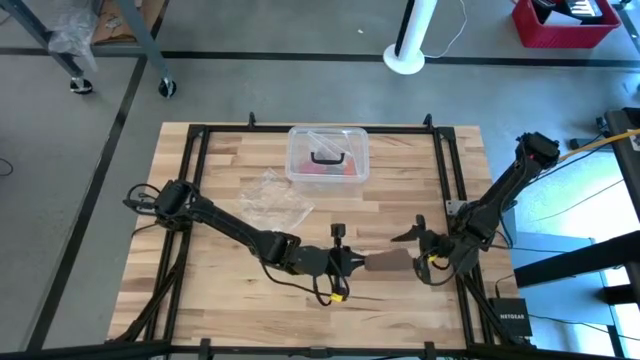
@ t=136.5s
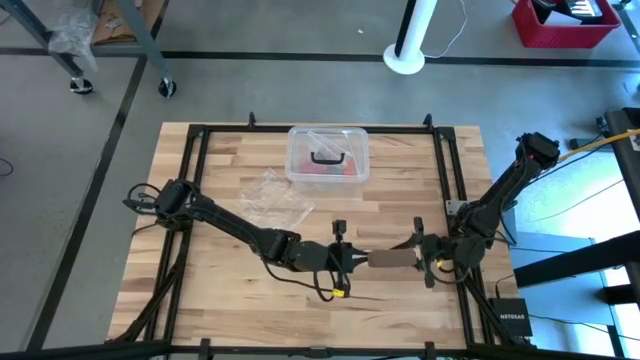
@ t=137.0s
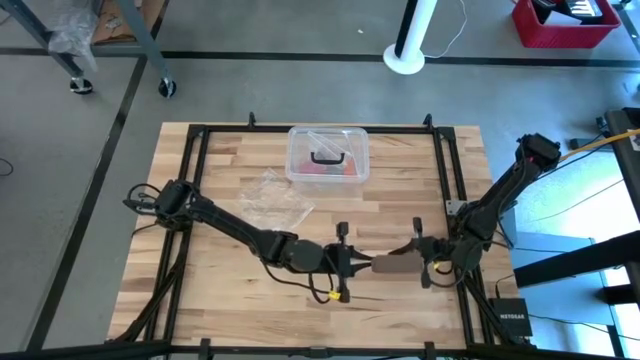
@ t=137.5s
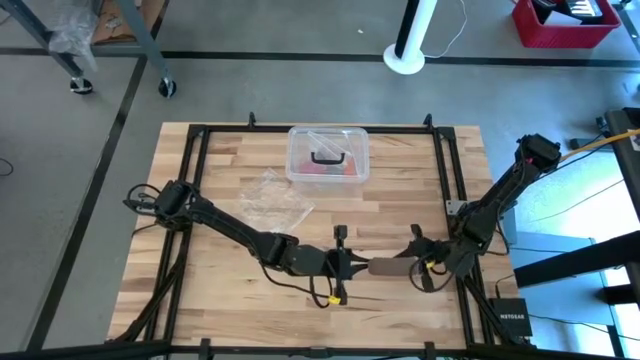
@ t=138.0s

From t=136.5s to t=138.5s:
Task: Roll bandage
Roll the brown bandage

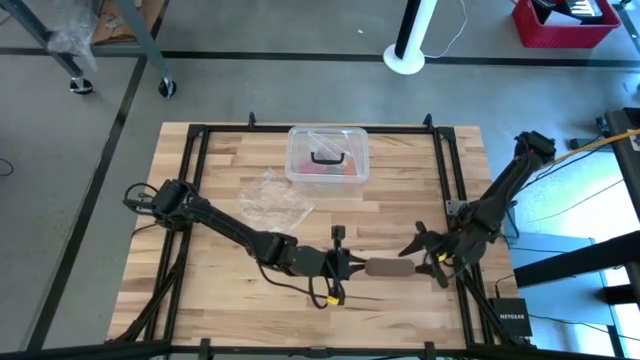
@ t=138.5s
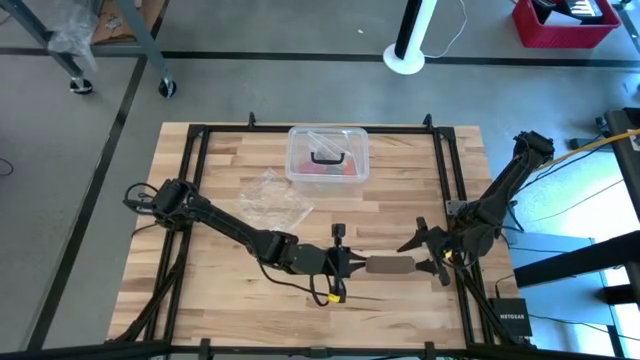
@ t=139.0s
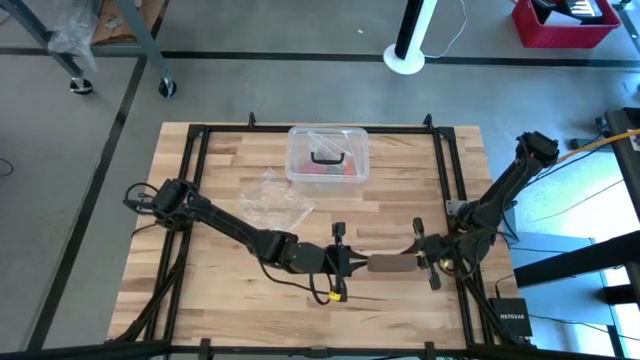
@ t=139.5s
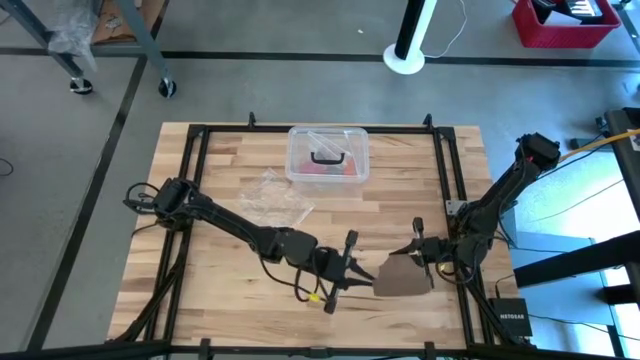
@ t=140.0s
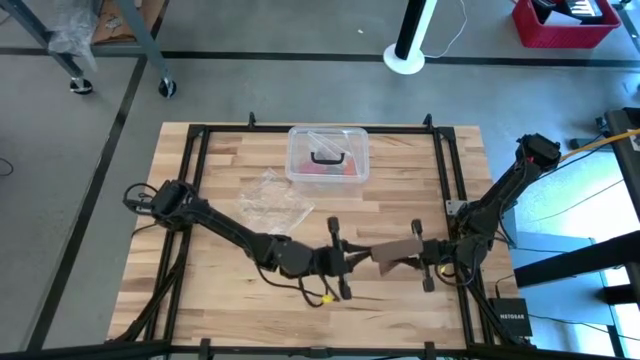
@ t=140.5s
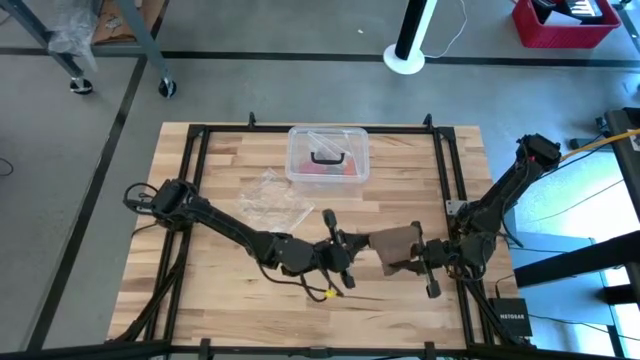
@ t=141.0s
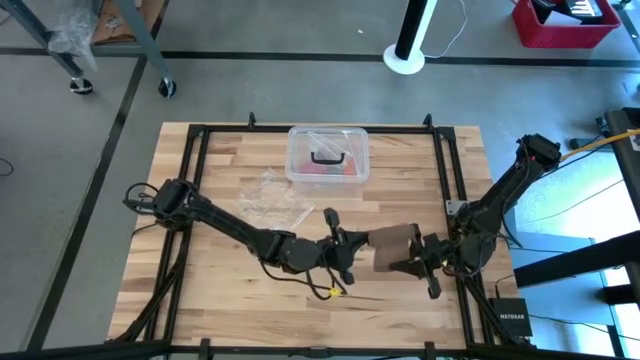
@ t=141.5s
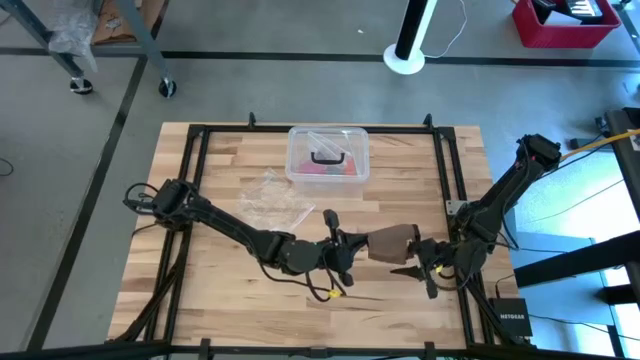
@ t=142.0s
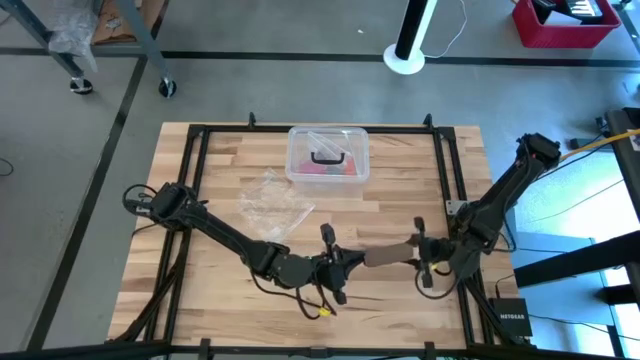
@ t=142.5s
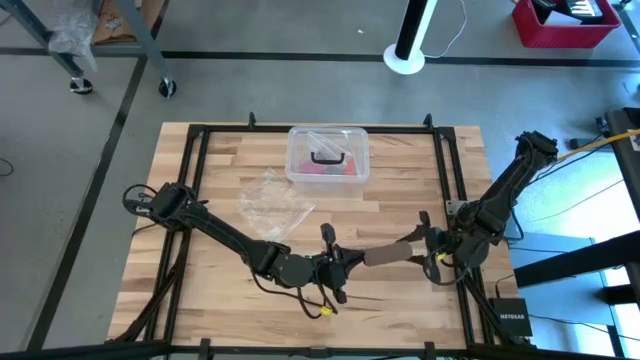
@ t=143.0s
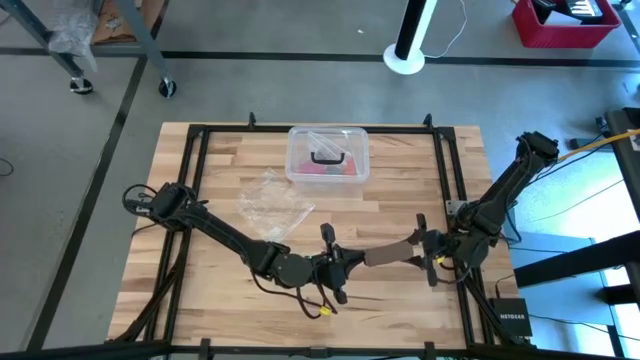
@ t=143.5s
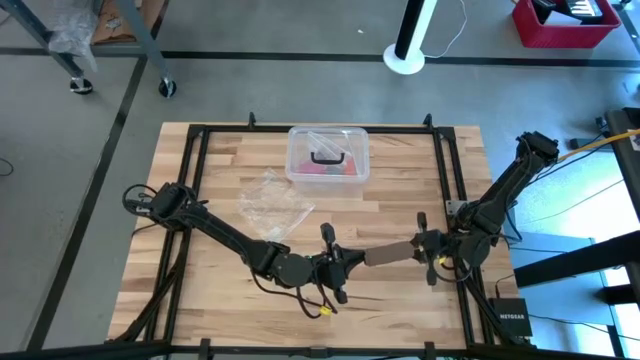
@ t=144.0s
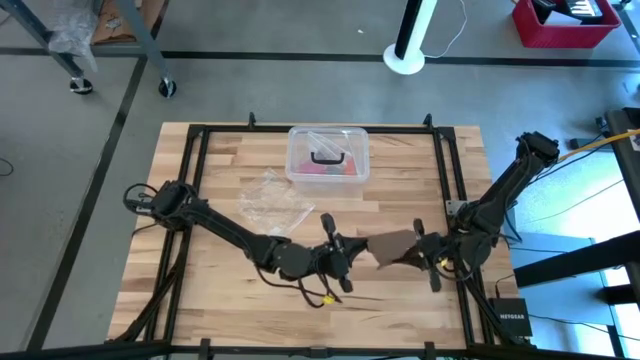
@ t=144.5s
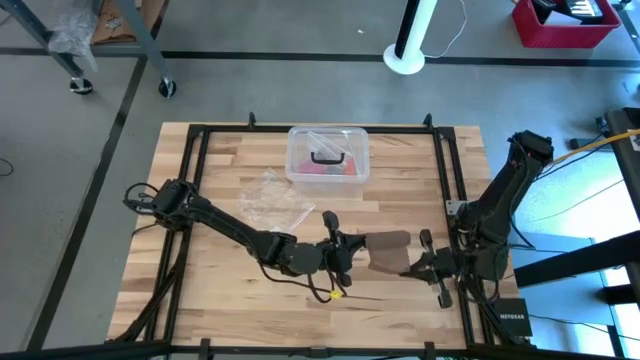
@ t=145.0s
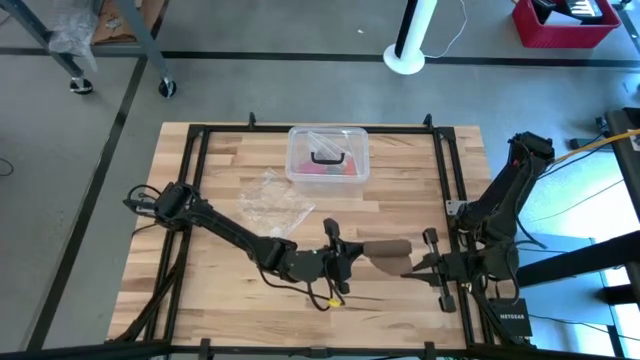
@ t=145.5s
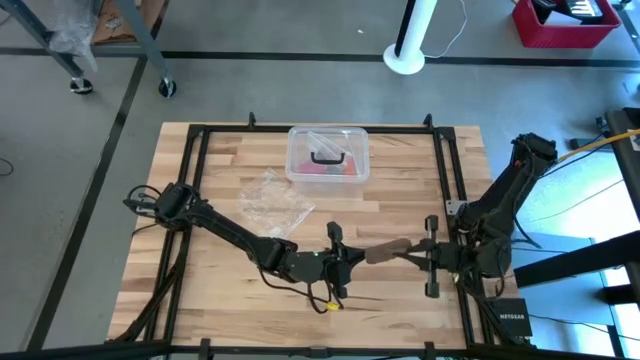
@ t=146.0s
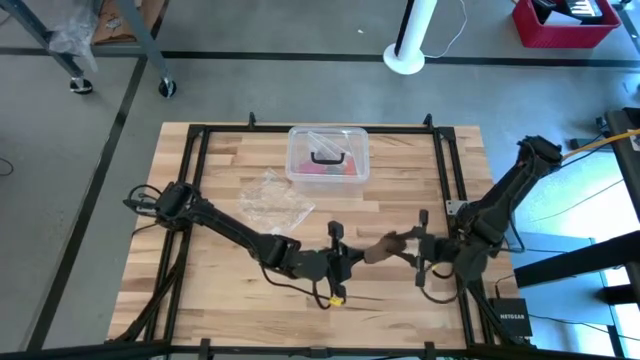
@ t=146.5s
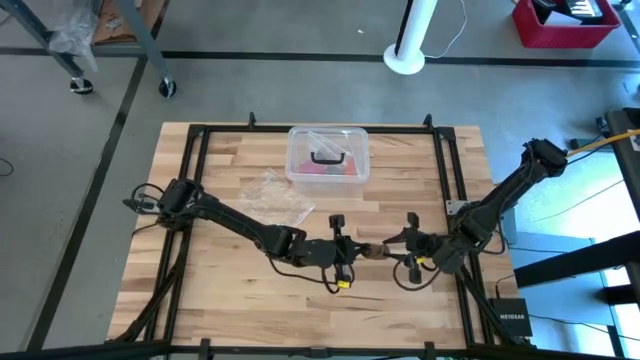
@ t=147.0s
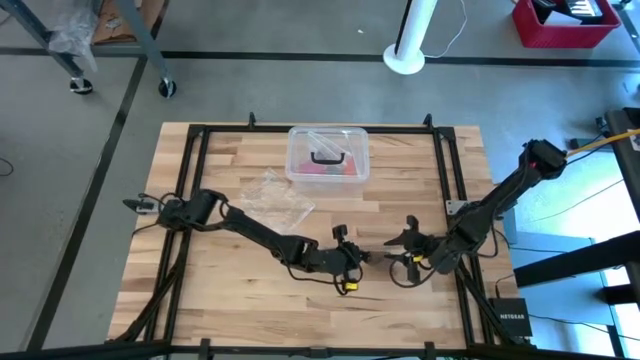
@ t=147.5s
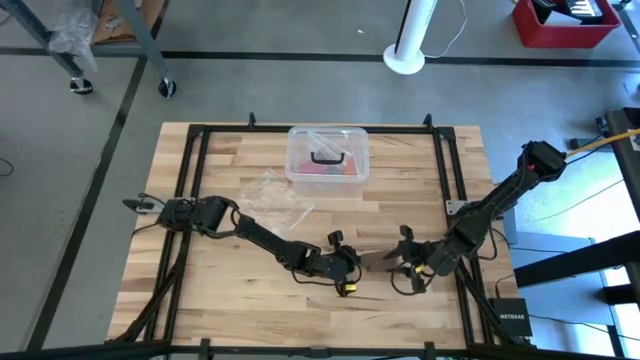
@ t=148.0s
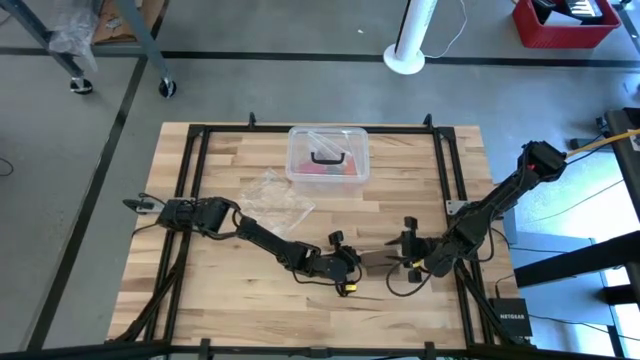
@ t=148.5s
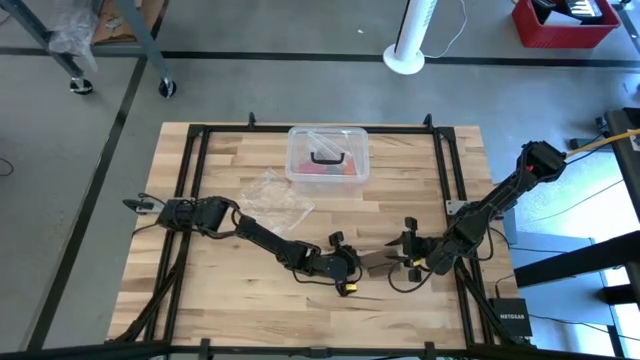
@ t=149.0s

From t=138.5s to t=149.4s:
Roll the brown bandage

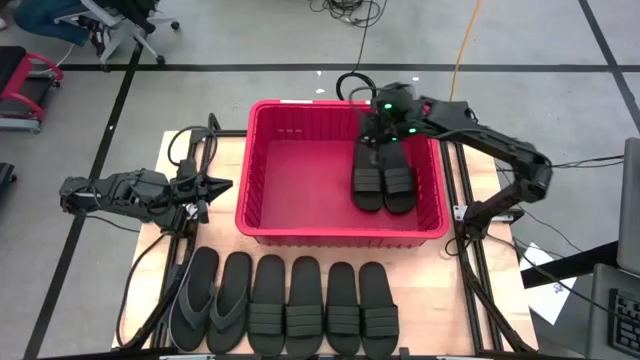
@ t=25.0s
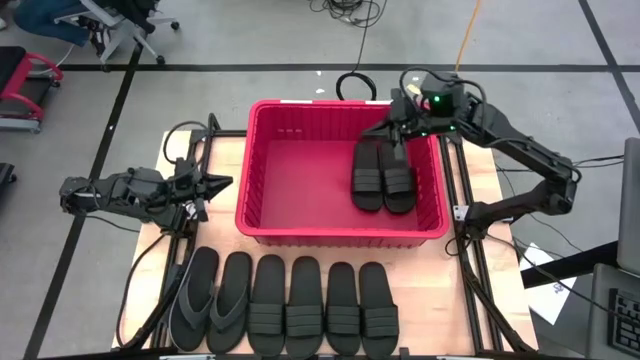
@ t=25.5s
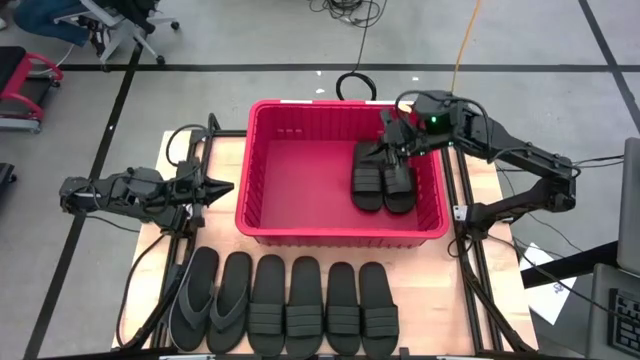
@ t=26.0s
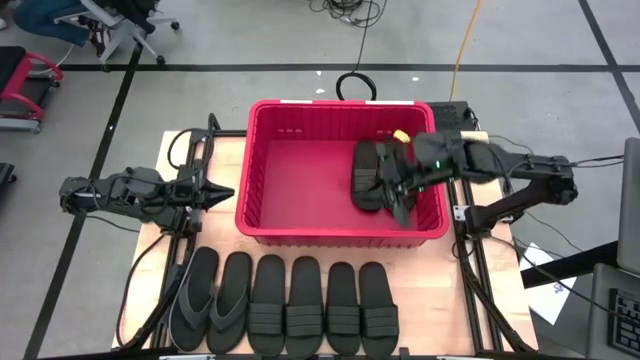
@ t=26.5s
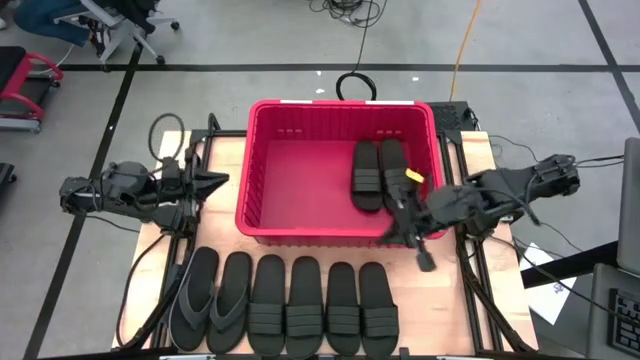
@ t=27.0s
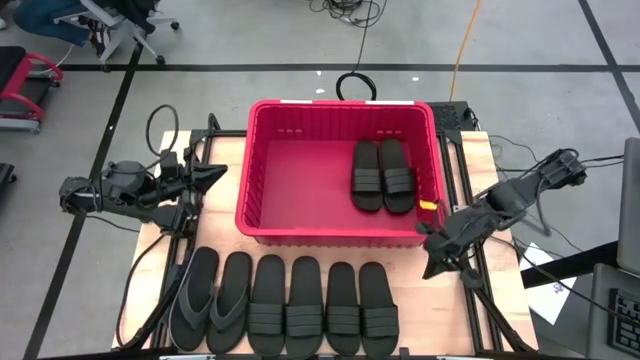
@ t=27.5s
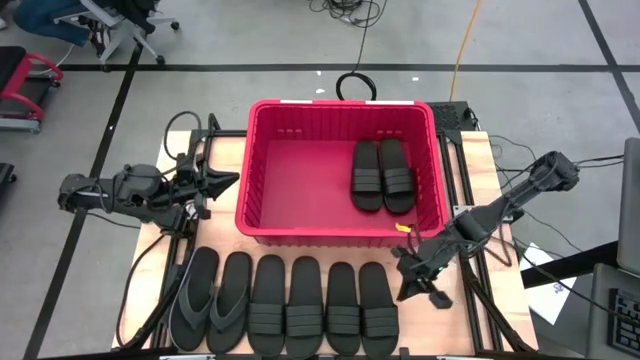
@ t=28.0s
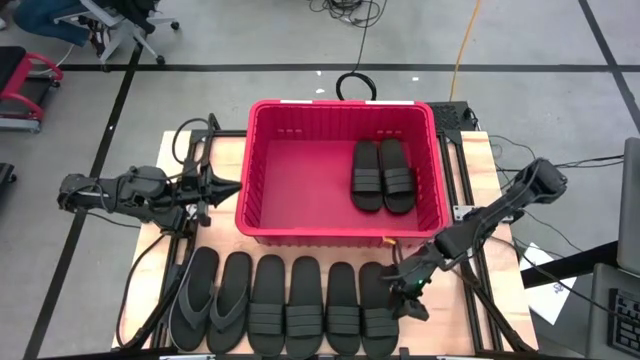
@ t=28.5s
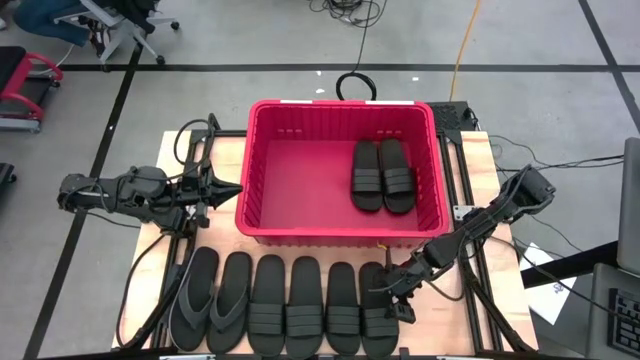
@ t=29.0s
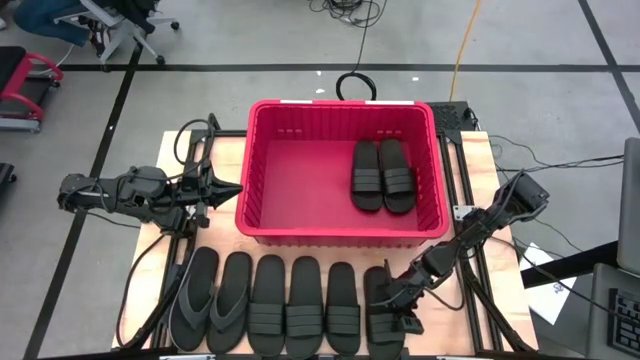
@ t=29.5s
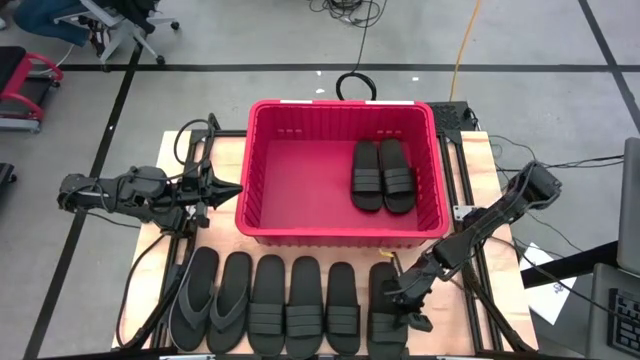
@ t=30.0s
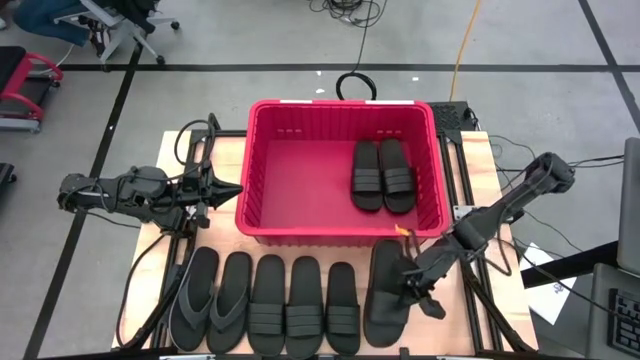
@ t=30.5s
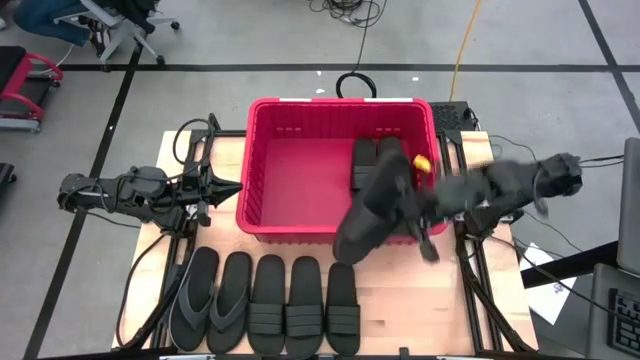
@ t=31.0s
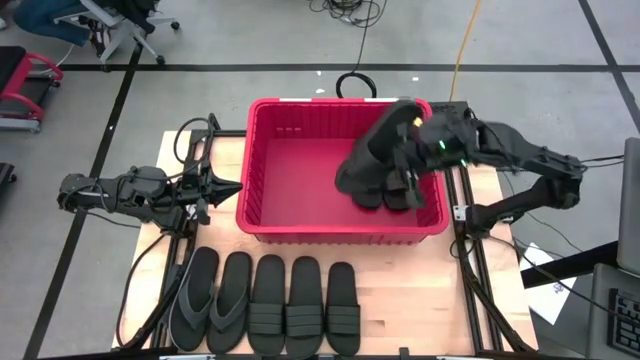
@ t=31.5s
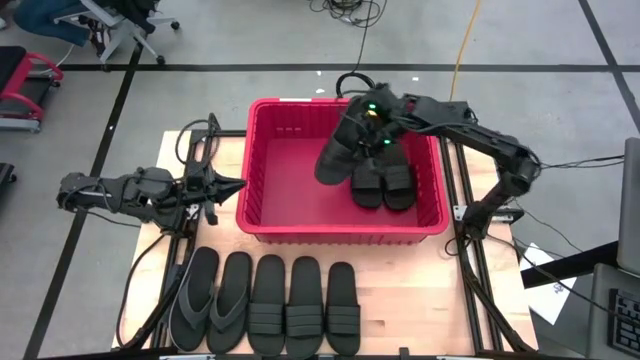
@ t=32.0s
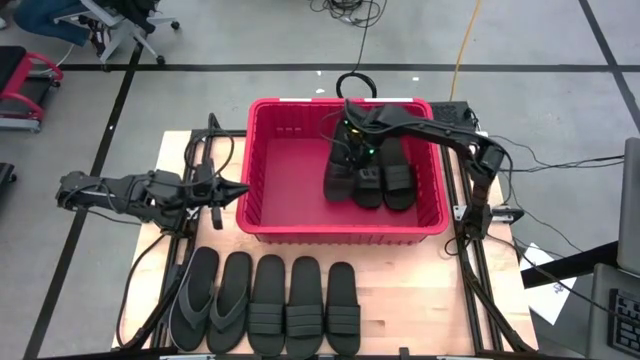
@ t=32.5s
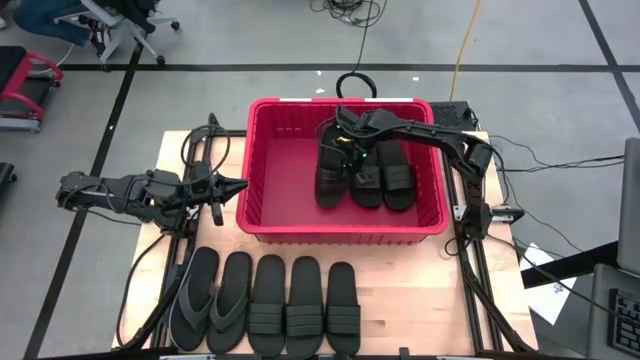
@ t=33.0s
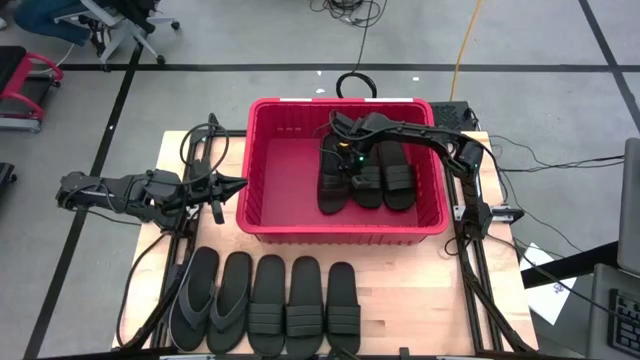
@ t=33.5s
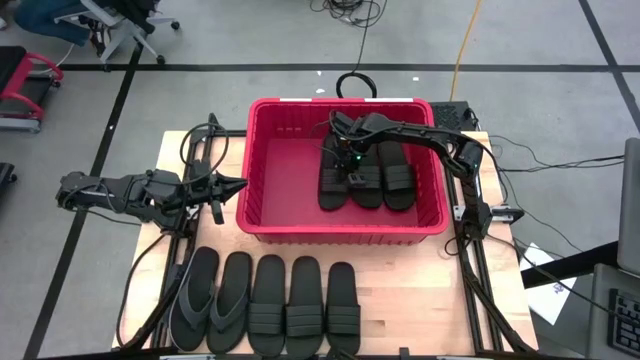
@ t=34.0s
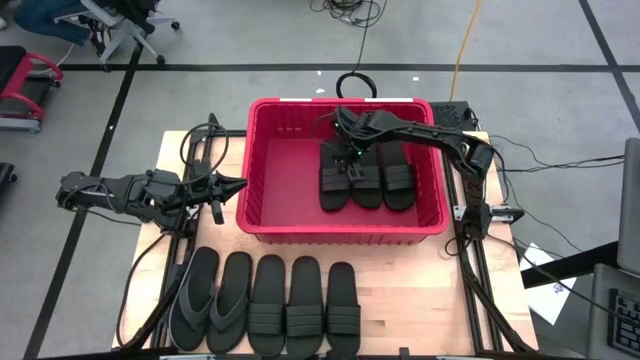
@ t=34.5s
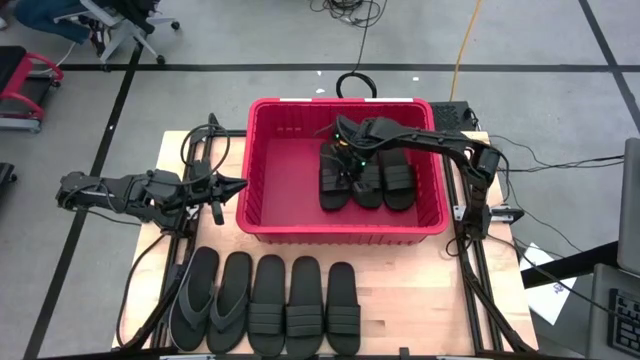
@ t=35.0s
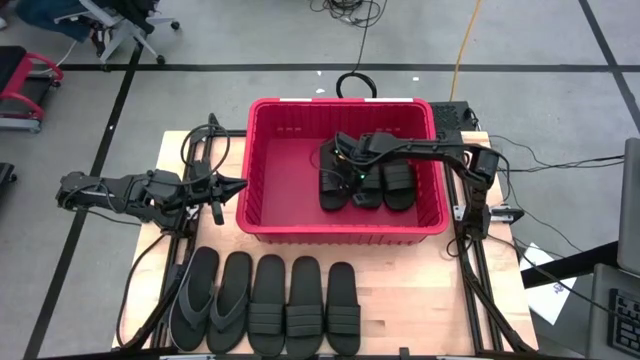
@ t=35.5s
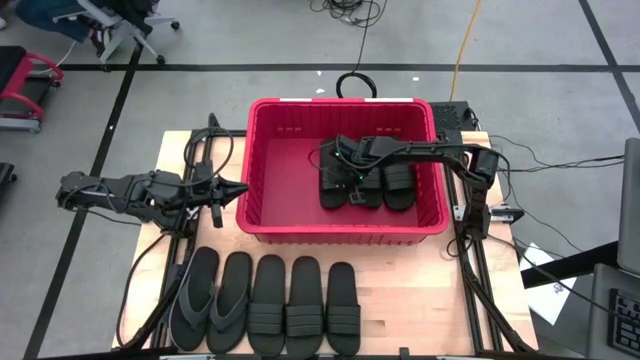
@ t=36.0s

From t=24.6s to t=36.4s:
Task: Pick and place slides into bin
Put the black slipper into the red bin
